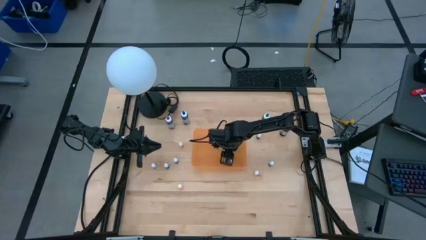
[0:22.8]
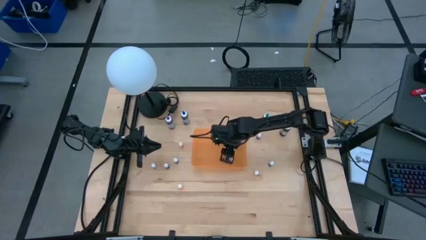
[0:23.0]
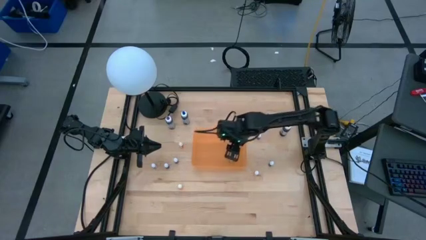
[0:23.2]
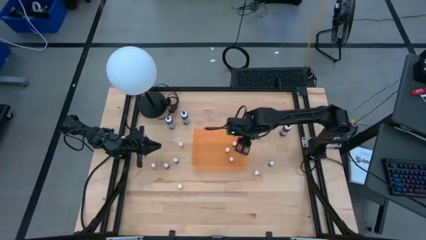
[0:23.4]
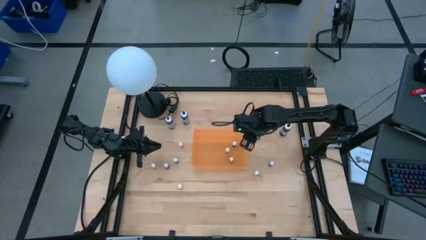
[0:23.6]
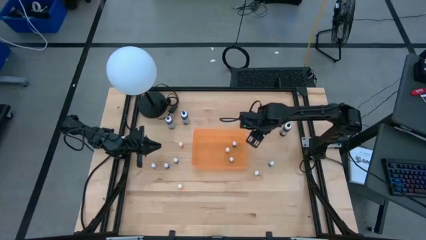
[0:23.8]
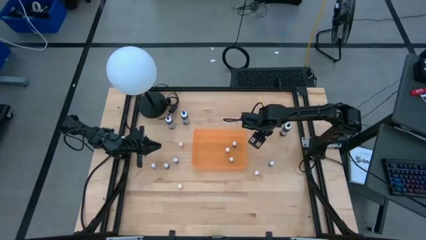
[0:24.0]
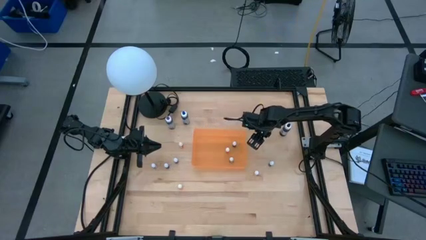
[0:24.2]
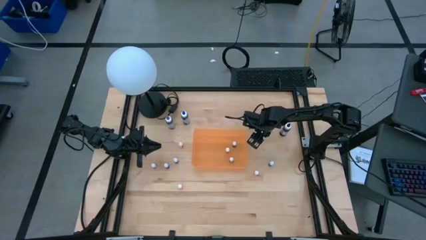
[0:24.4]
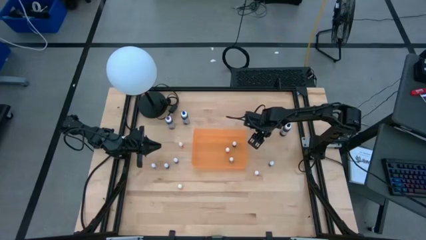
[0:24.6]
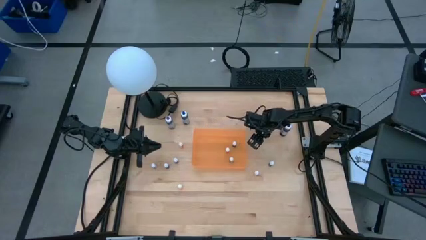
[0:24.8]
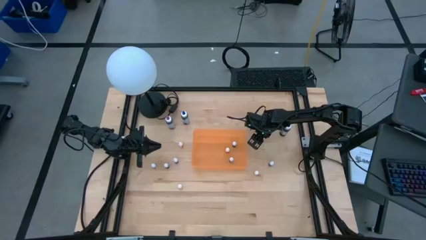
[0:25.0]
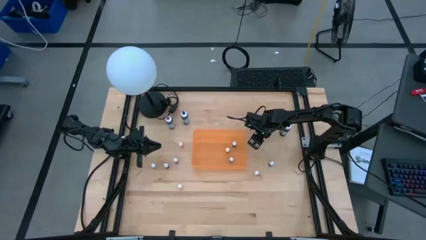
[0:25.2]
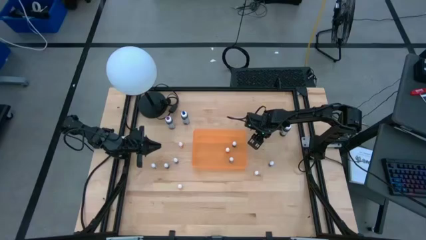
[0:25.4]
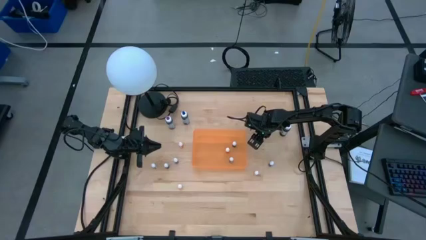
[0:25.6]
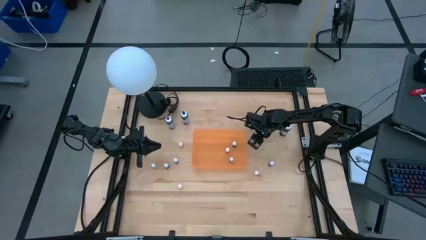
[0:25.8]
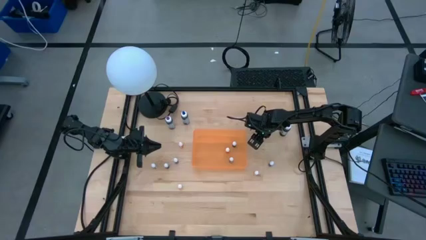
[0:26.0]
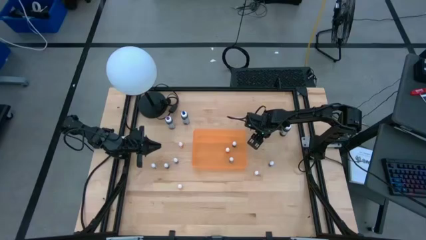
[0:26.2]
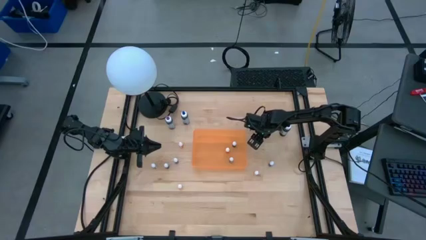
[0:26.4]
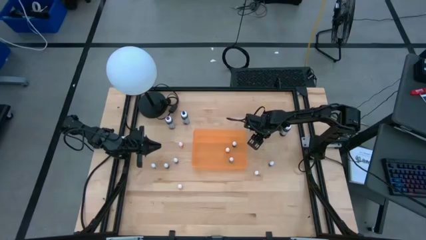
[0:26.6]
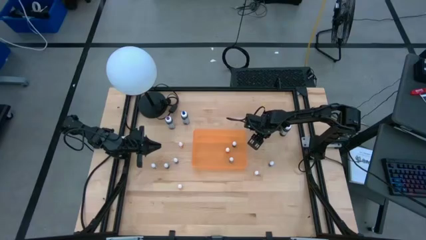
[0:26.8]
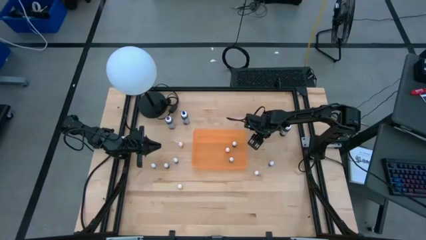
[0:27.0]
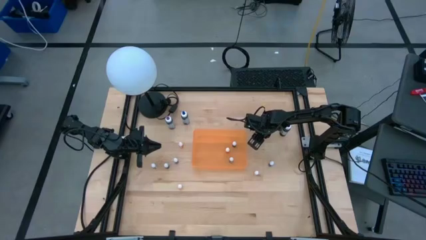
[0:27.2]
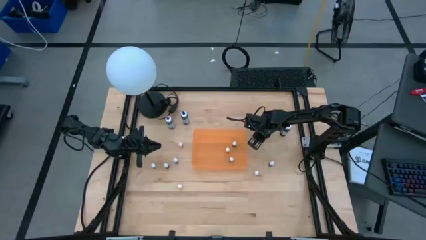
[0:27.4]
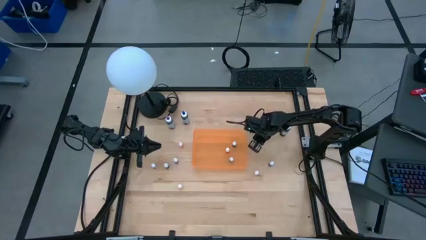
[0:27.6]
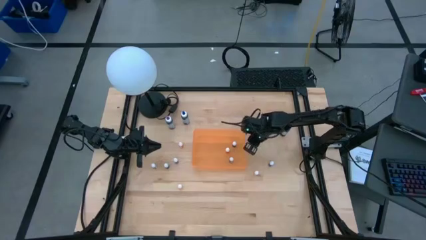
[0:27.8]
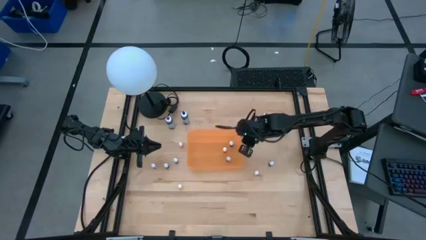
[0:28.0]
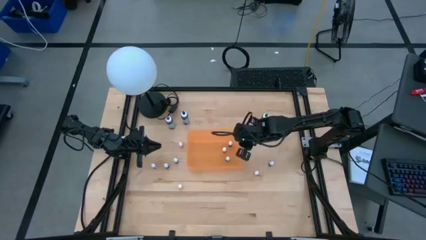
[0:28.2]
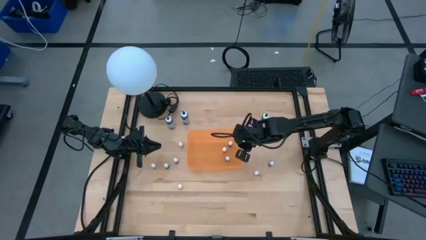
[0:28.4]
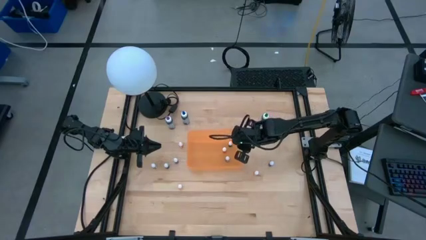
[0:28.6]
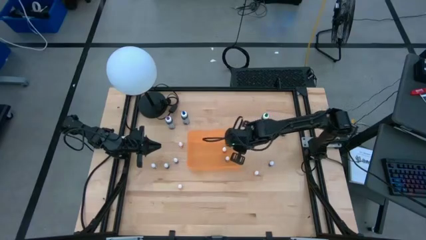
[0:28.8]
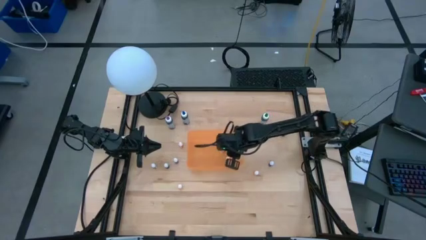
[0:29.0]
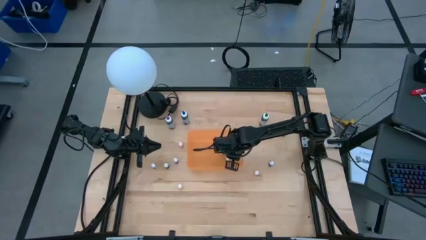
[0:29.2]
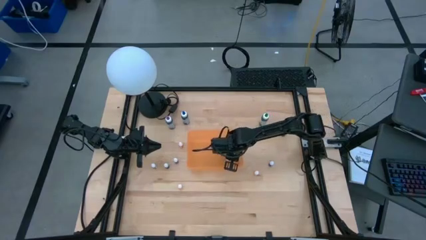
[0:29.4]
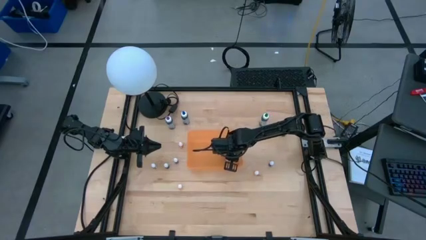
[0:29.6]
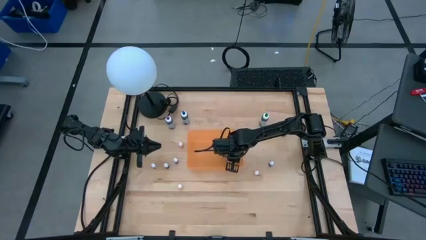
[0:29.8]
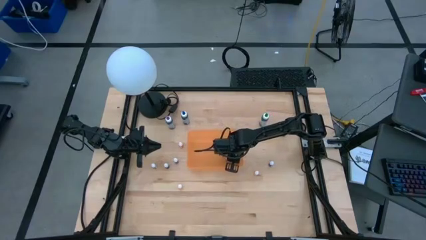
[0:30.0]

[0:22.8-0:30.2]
Task: Pick & Place food coloring
Put the small violet food coloring bottle into the orange bin

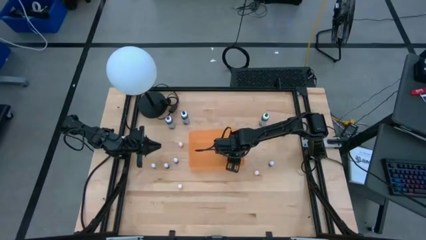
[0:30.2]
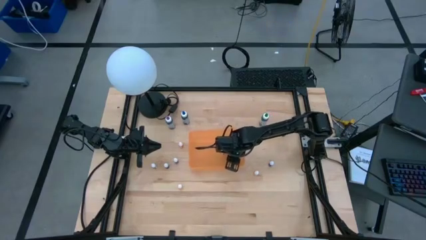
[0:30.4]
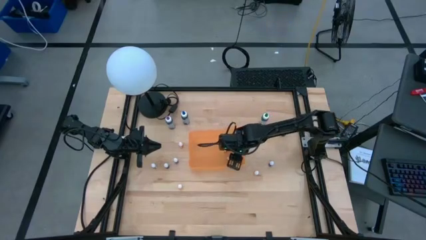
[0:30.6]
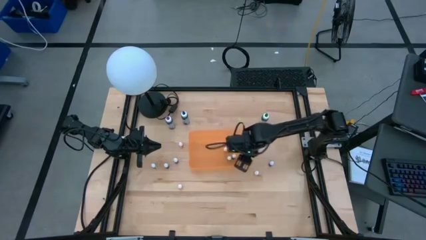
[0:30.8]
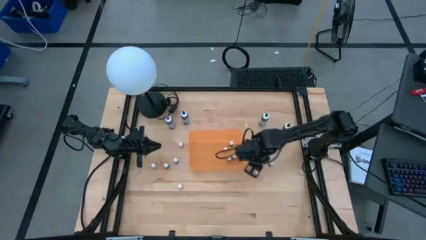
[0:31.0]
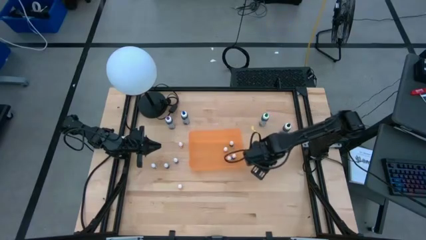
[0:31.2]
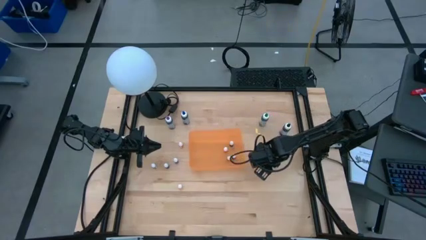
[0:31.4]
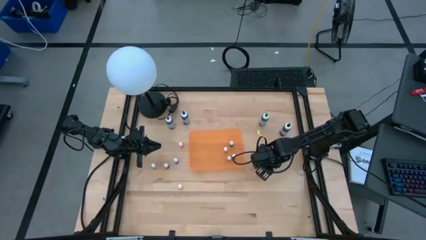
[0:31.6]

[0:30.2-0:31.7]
Put the small blue food coloring bottle into the orange bin

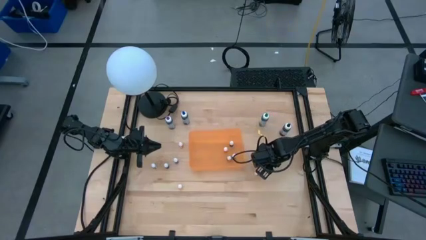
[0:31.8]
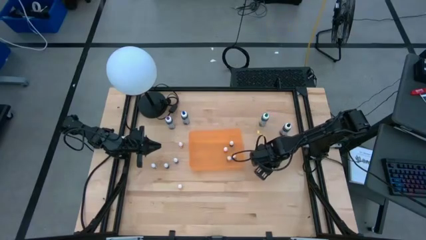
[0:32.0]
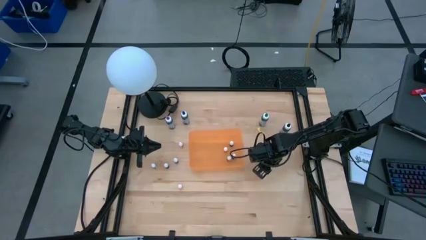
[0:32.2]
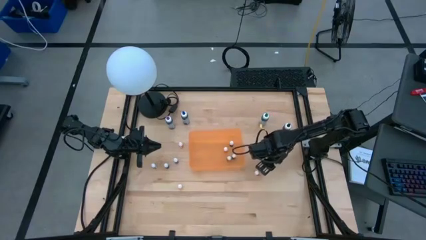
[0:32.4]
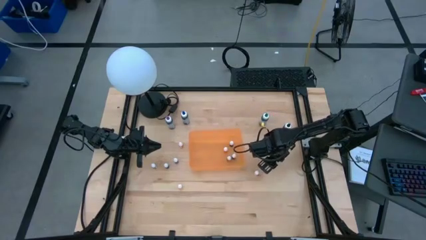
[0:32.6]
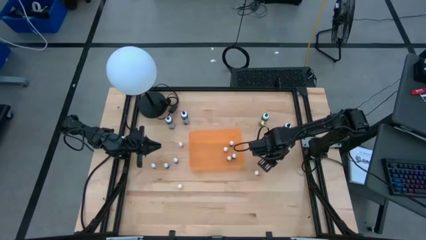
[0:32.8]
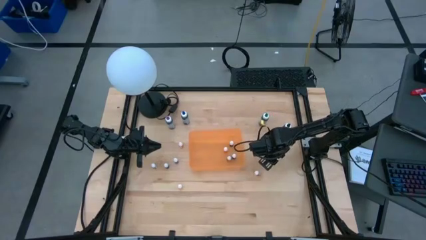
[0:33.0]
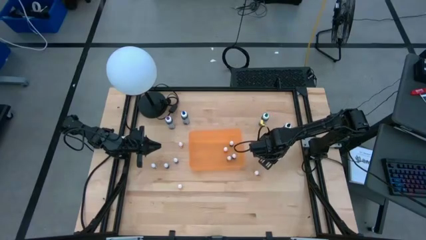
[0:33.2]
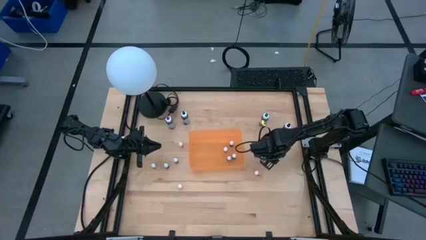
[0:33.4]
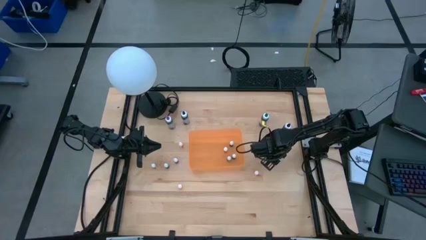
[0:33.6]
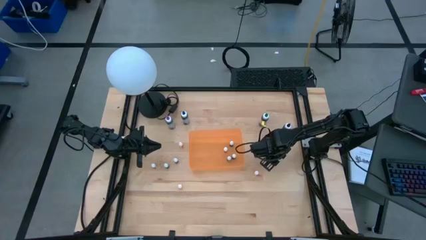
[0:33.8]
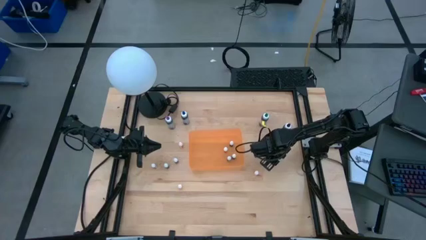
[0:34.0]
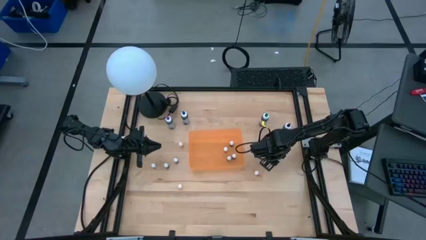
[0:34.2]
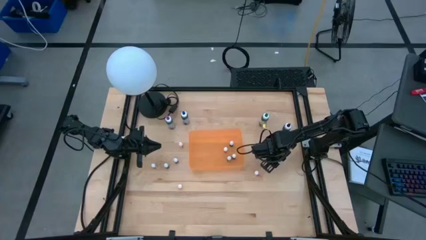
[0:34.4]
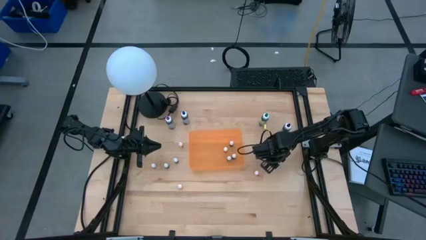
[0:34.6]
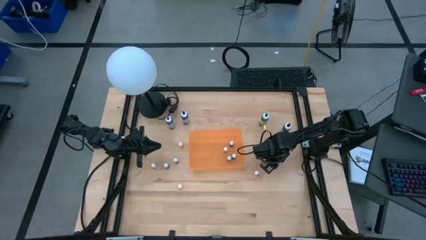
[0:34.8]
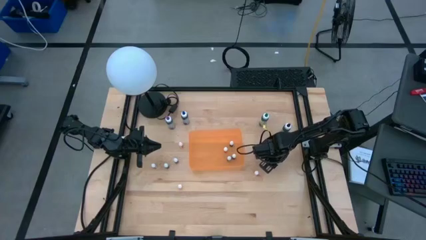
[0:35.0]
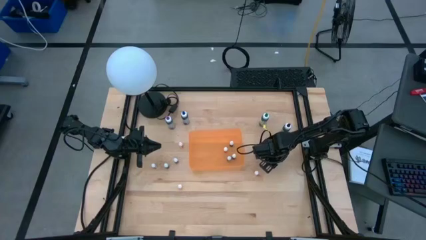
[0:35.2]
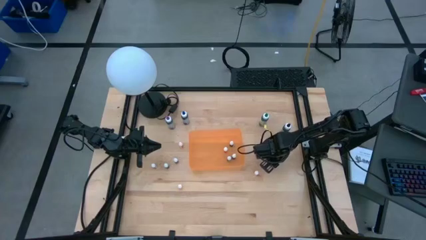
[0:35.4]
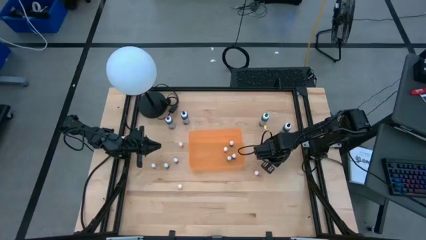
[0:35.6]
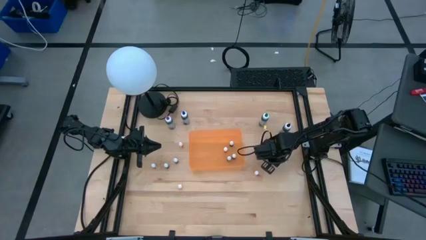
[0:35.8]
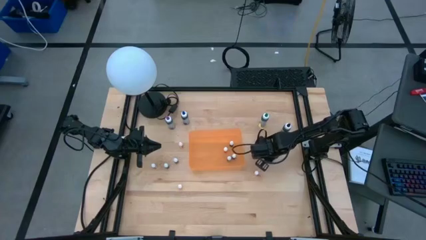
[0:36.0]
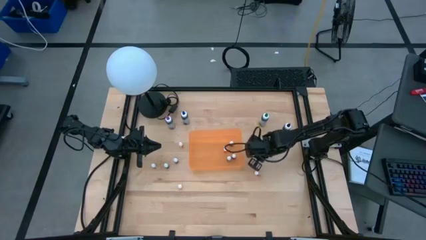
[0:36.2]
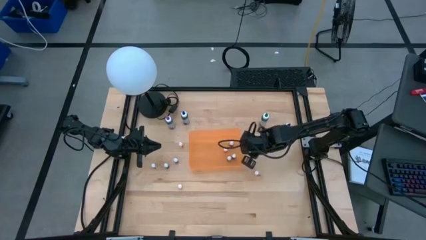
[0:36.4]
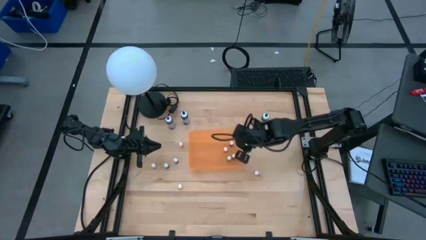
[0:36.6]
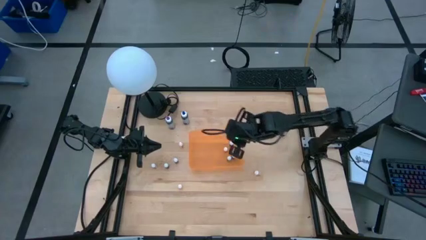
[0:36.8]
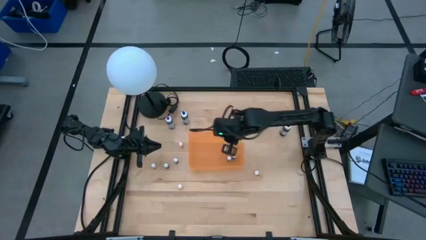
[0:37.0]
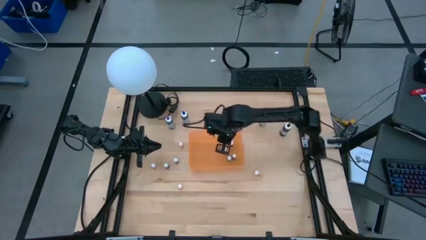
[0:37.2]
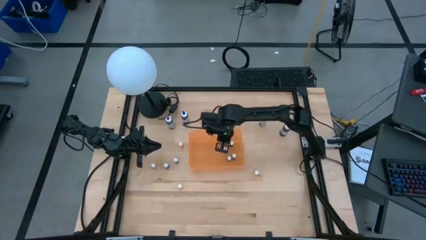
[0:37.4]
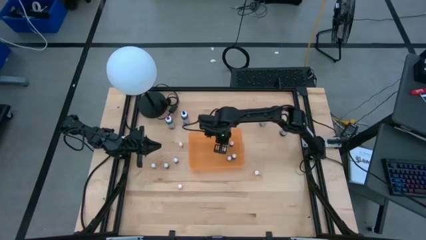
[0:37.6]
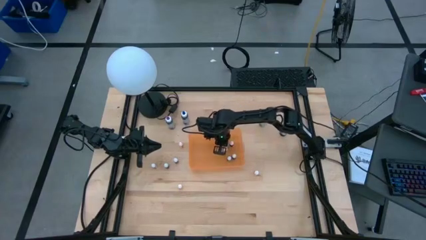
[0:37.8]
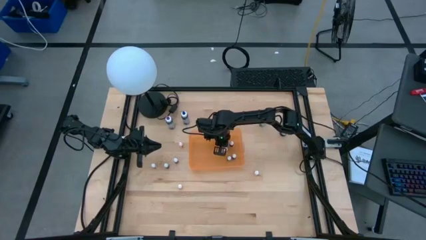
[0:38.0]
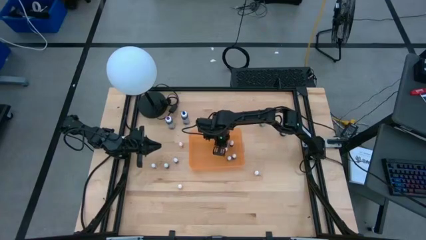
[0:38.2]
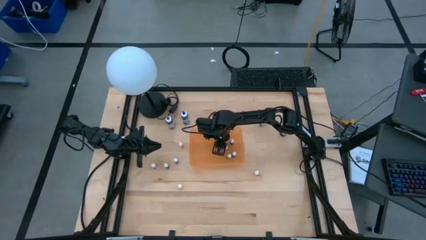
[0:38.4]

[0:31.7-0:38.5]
Put the small blue food coloring bottle into the orange bin

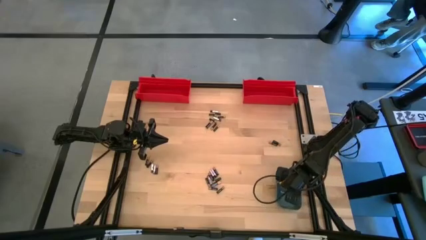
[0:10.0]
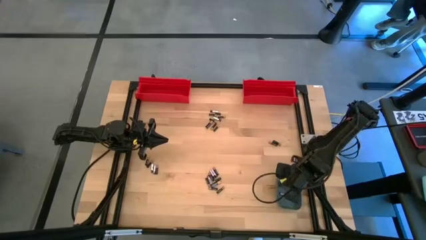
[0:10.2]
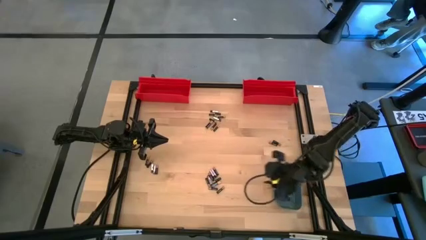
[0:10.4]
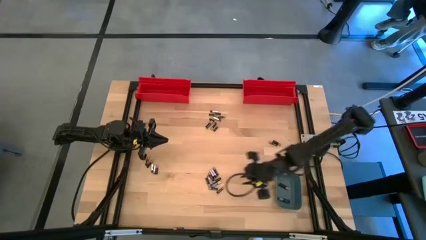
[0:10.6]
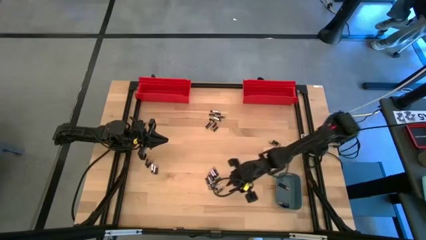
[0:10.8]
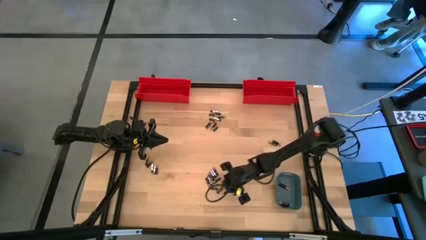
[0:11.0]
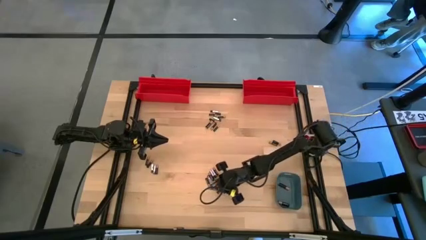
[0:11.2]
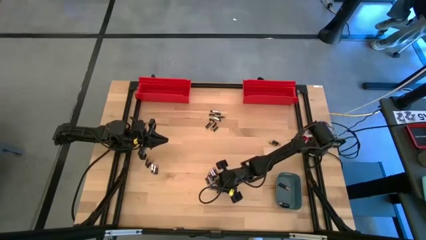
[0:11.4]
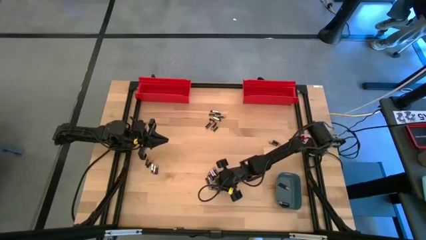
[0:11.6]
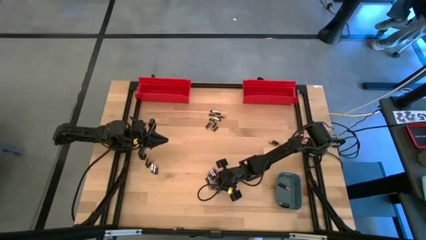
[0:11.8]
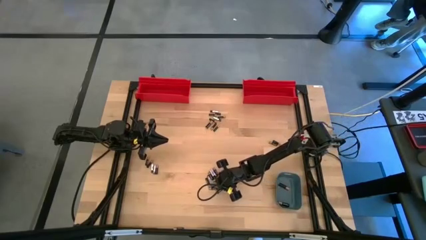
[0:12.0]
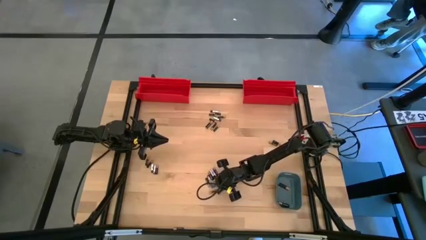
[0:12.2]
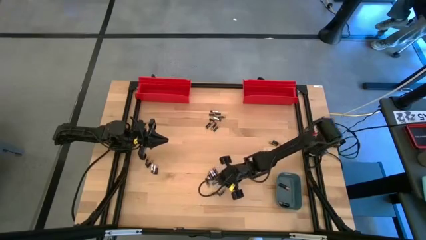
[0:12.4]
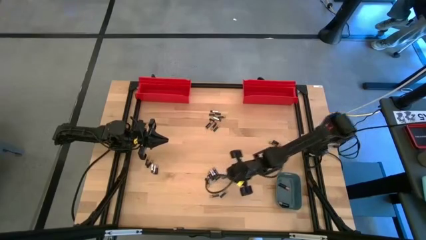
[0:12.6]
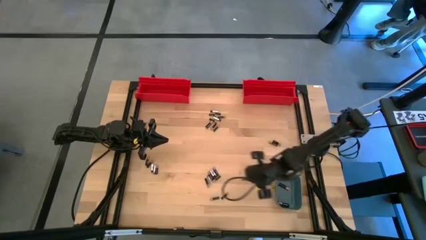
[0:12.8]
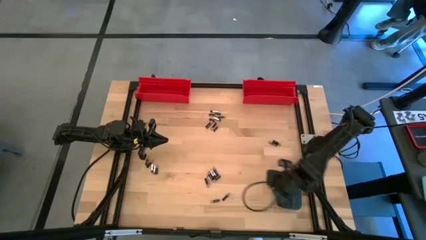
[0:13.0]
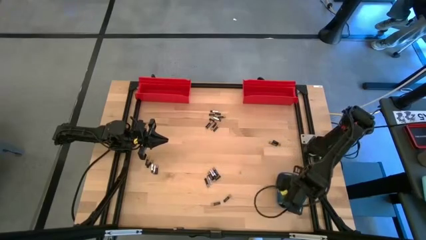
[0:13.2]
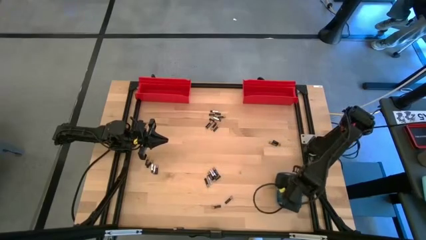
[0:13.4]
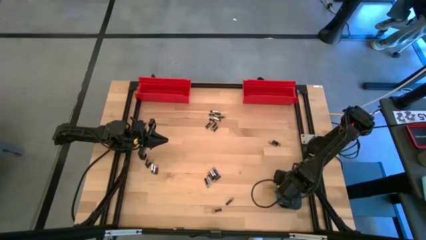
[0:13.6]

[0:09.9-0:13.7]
Task: Sort batteries
Put the large black battery into the blue bin
